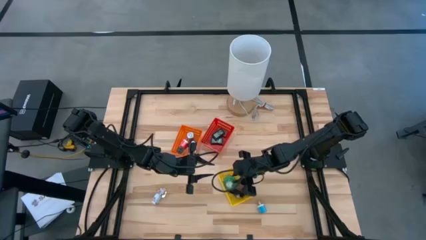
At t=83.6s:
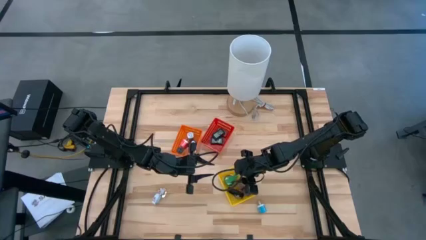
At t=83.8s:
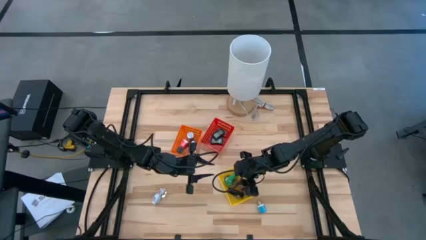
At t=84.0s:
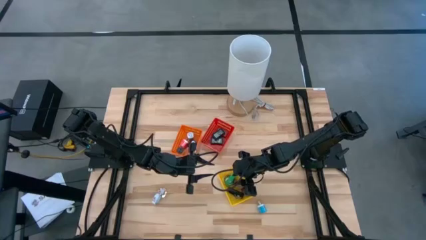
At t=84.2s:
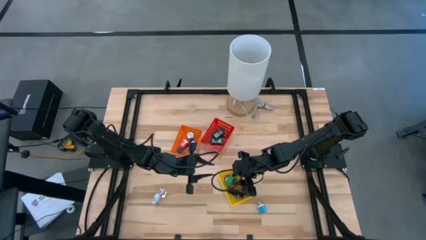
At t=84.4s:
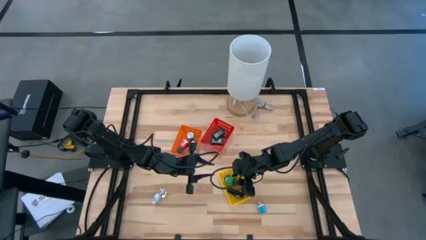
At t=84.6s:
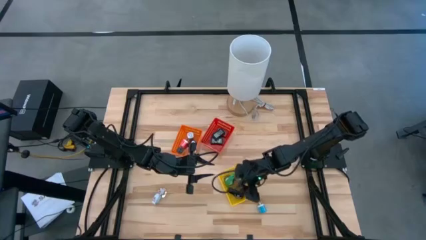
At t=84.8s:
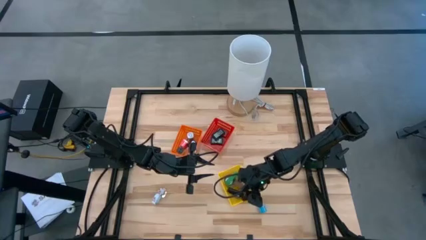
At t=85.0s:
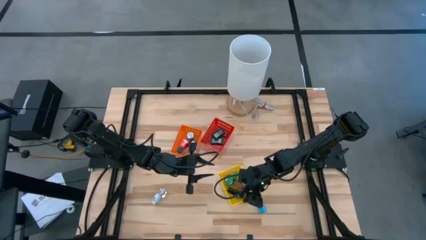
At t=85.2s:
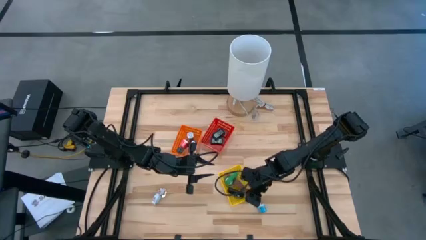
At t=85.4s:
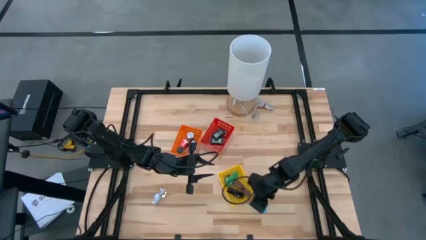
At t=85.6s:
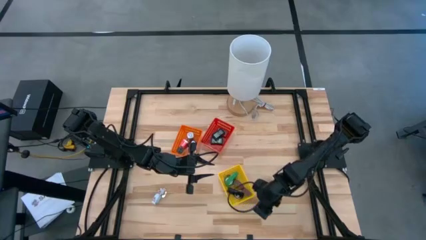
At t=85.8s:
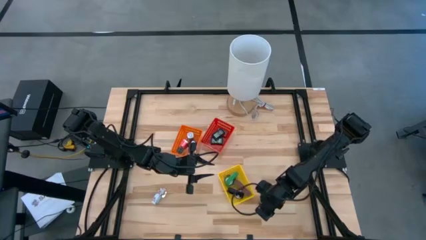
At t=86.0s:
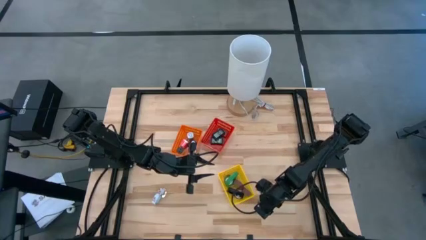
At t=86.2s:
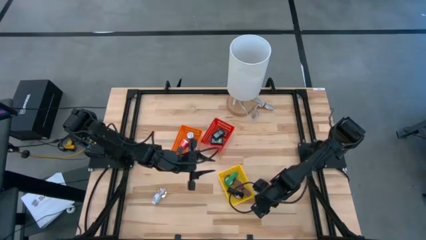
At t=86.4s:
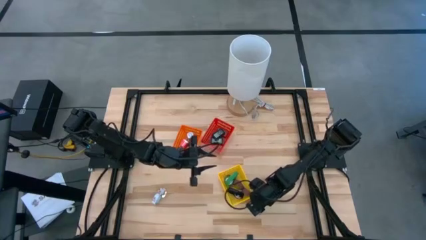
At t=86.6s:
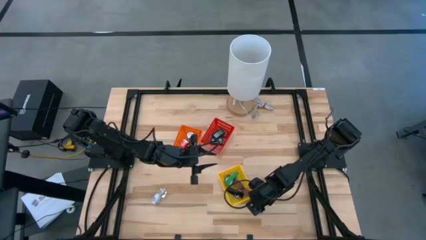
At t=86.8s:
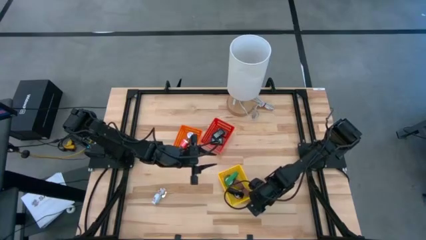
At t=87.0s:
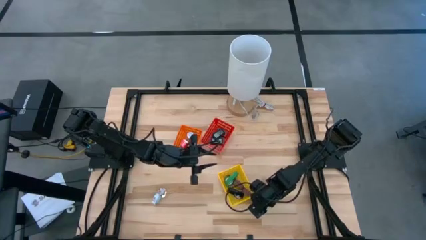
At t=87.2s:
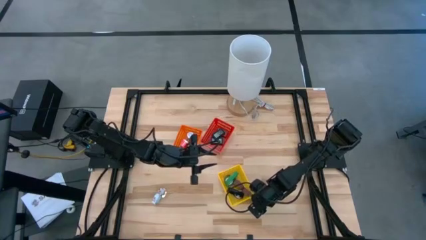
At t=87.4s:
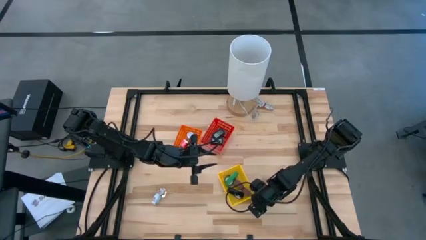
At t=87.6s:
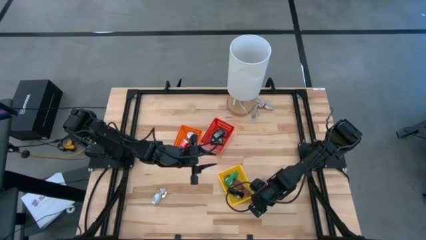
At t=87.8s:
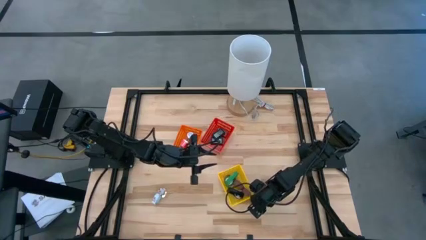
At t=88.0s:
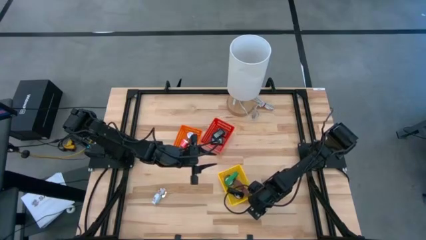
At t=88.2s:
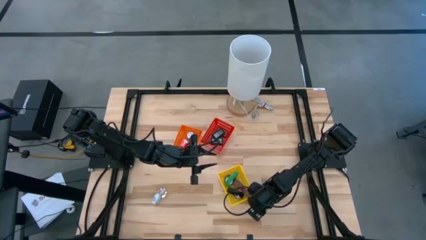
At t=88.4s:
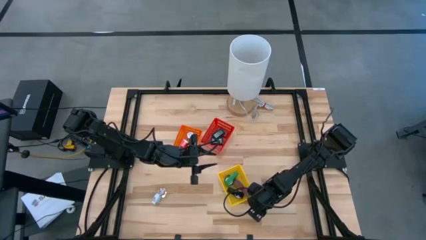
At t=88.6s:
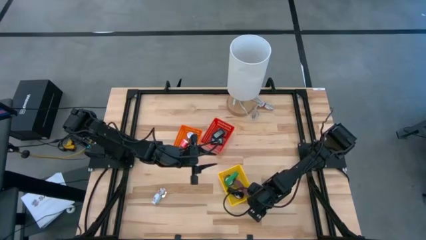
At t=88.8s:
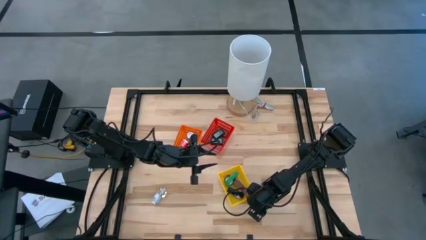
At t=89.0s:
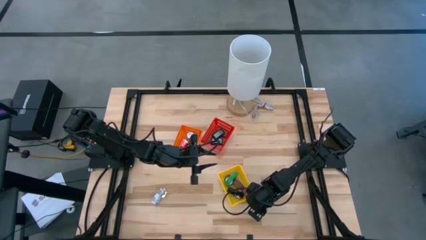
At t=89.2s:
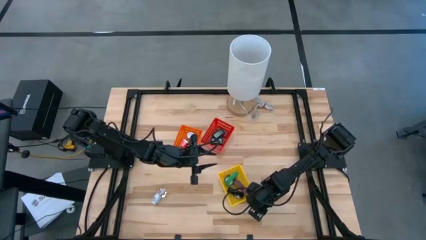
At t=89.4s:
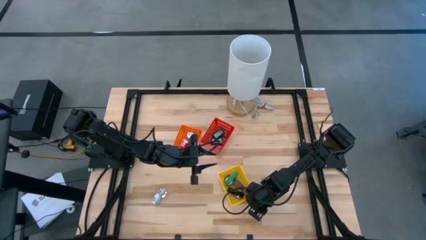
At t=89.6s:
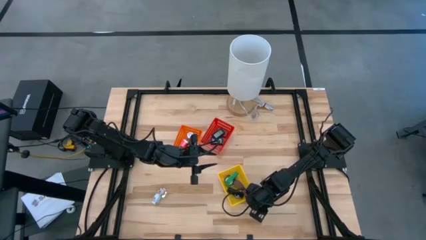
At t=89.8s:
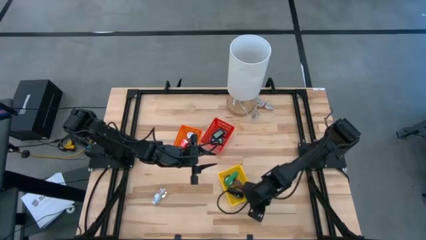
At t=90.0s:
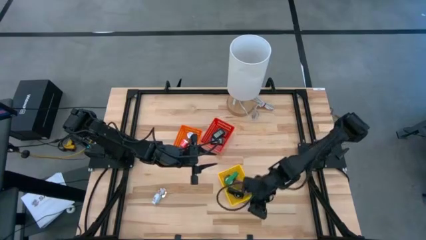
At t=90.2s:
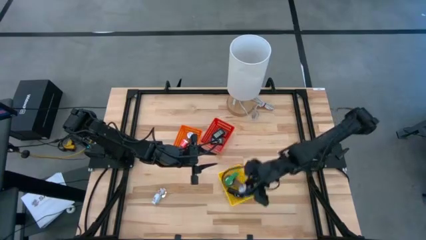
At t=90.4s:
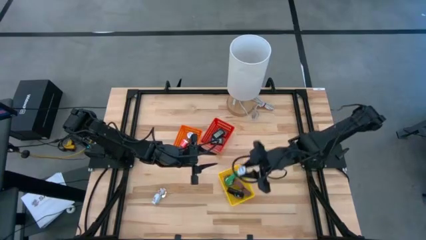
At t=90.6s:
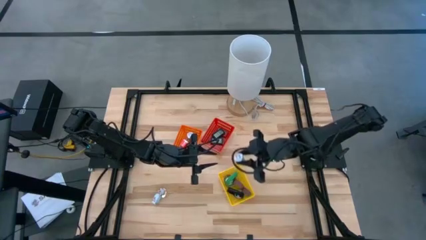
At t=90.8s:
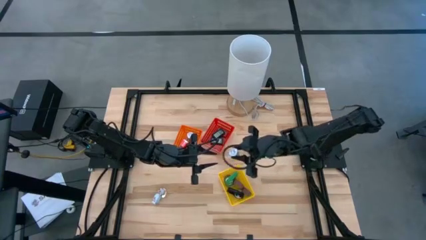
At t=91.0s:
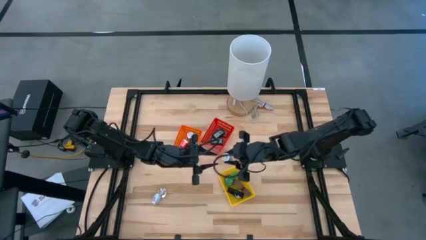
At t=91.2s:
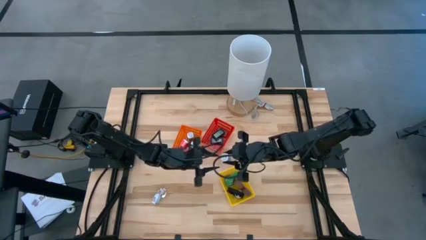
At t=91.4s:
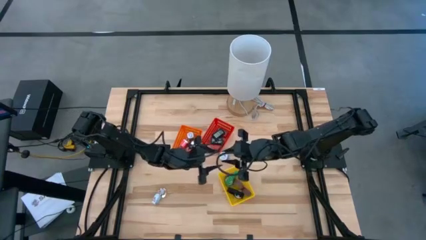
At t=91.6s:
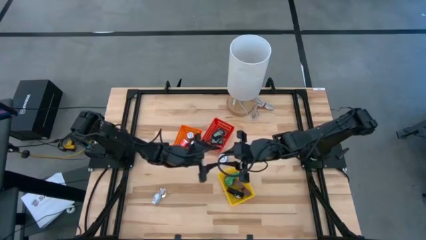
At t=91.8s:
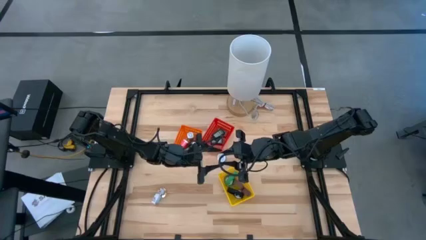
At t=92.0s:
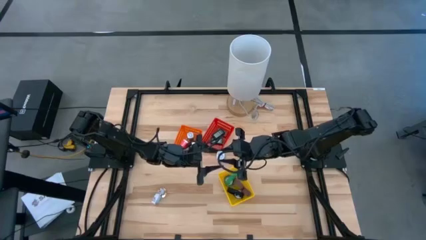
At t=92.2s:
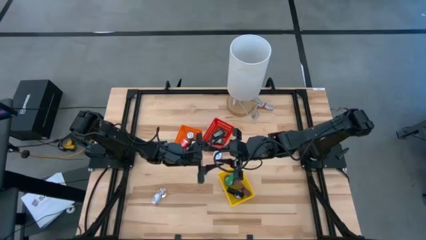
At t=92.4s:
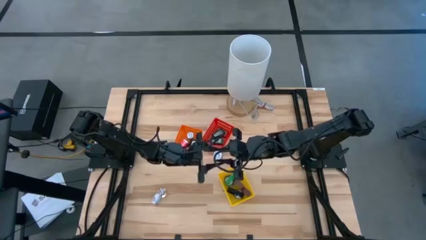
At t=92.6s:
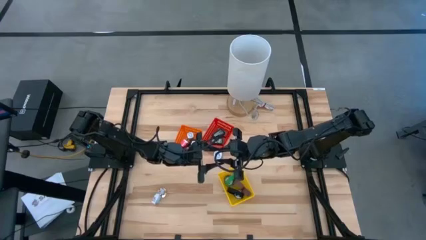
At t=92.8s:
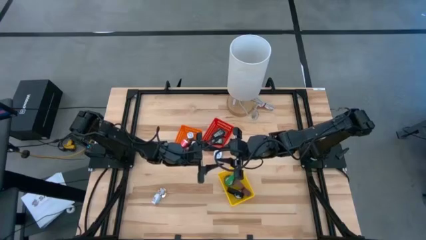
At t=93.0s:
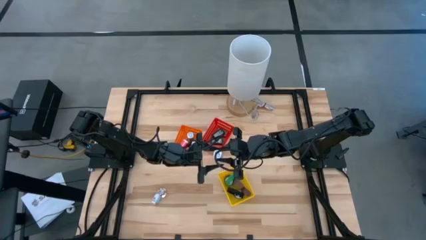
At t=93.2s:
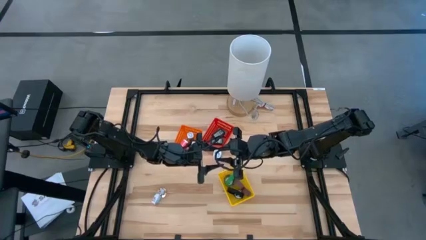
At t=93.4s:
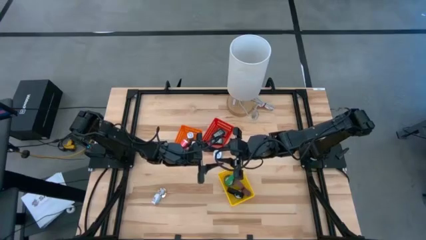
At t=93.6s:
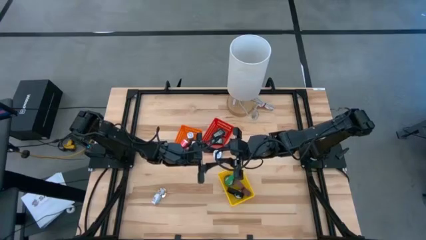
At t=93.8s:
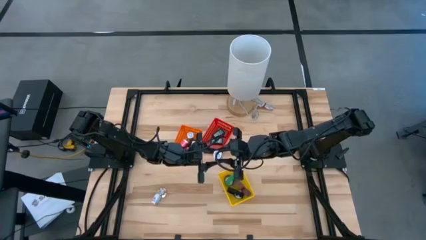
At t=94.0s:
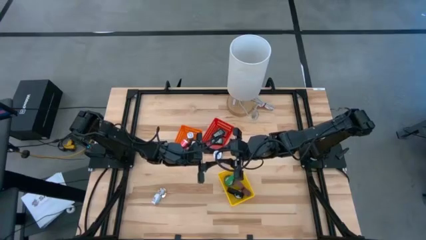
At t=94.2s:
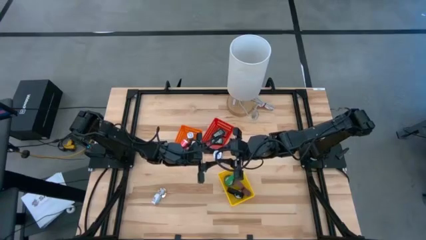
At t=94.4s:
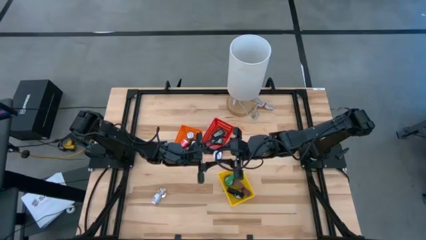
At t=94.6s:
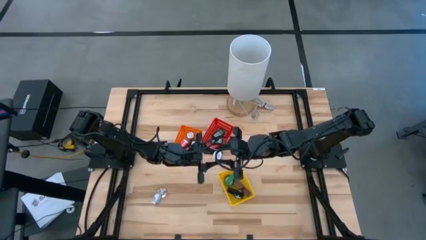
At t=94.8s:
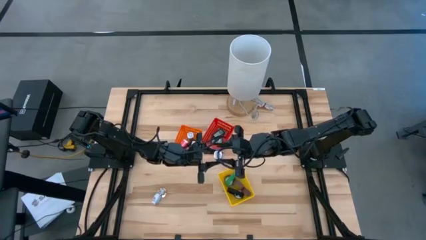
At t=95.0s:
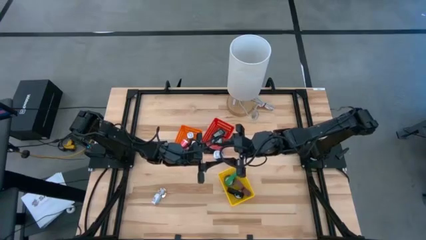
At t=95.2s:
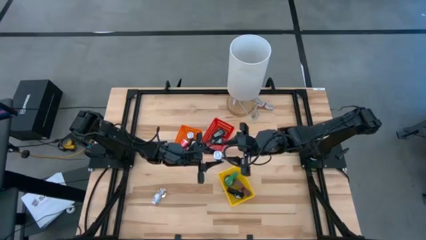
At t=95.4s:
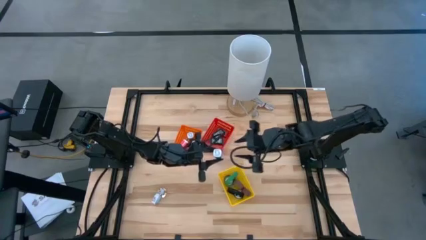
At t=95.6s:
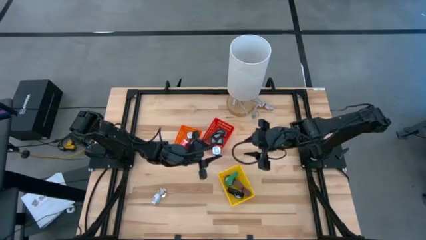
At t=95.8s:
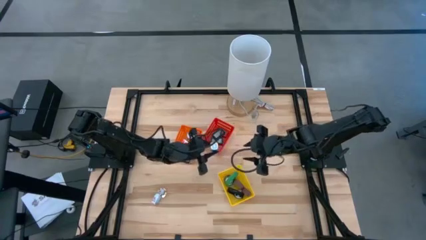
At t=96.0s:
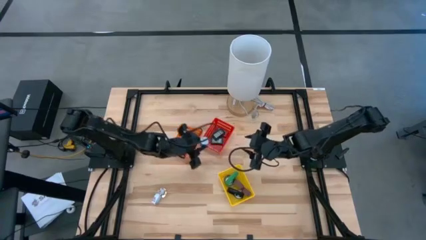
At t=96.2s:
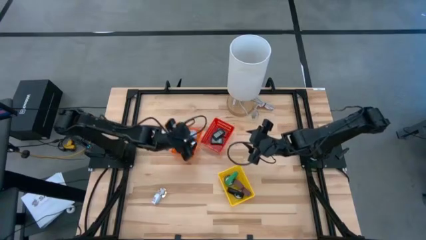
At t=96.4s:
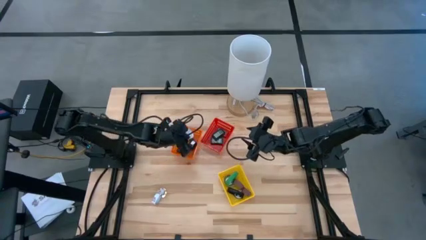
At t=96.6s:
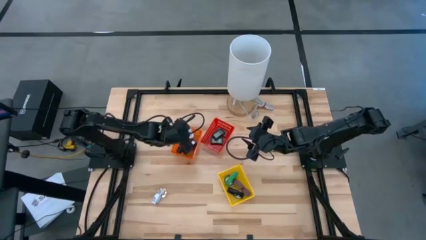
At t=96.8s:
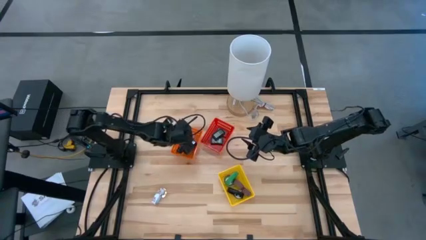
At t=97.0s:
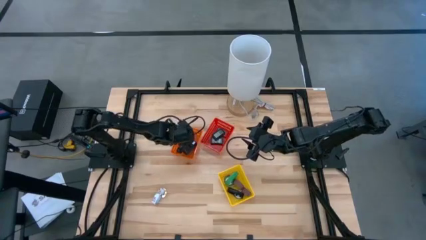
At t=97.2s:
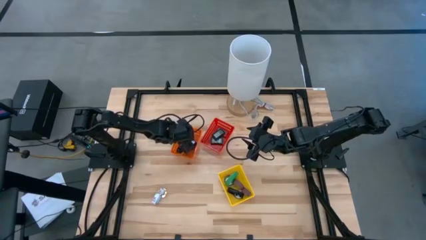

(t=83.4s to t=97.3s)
Task: Pick & Place Office items
Put the blue charger adapter into the orange bin
